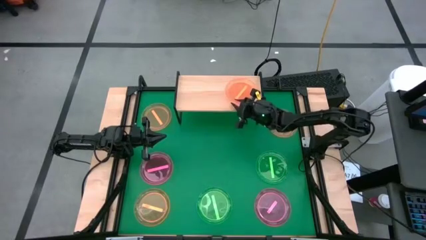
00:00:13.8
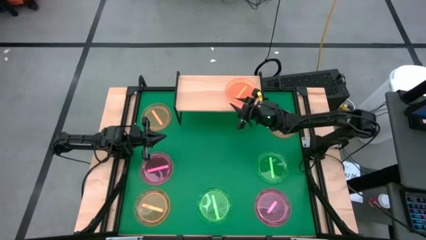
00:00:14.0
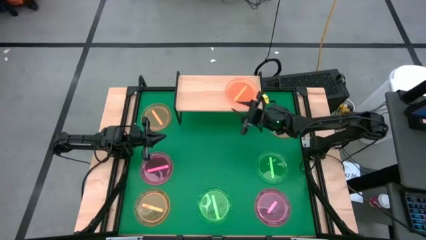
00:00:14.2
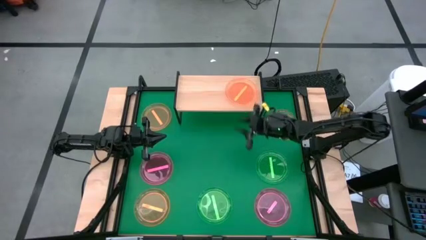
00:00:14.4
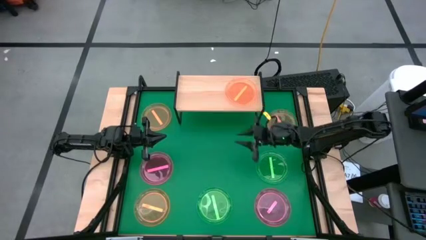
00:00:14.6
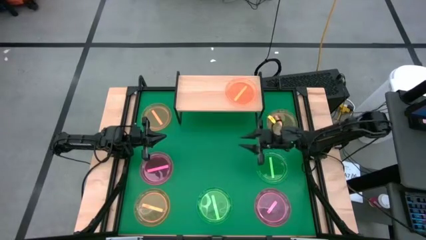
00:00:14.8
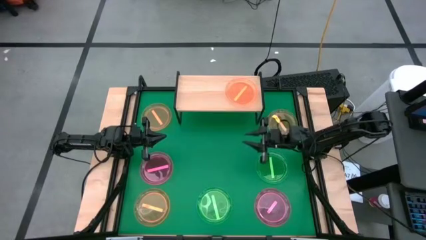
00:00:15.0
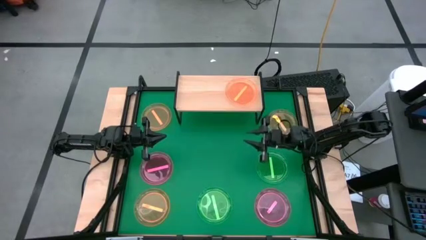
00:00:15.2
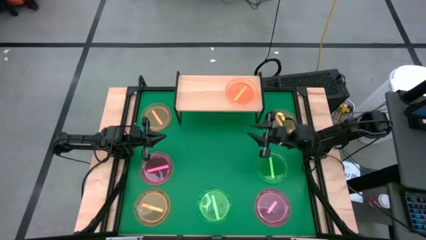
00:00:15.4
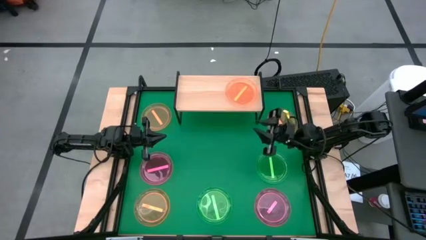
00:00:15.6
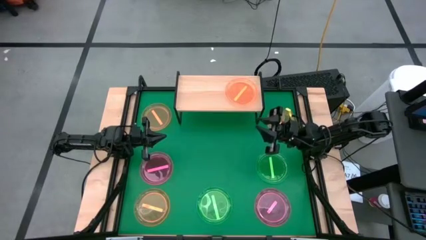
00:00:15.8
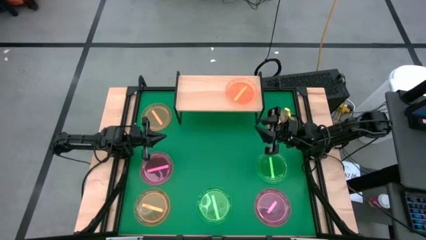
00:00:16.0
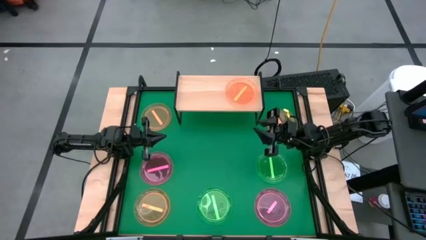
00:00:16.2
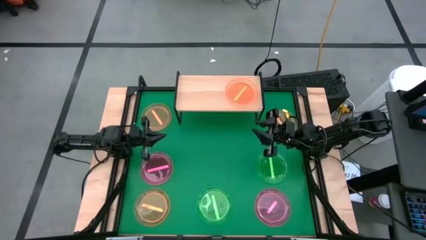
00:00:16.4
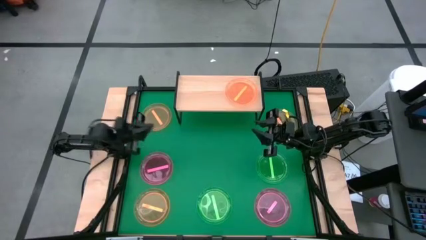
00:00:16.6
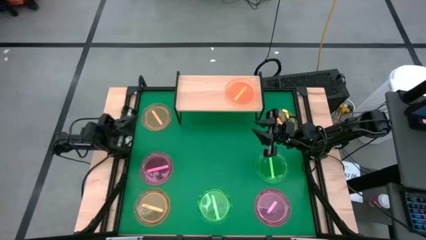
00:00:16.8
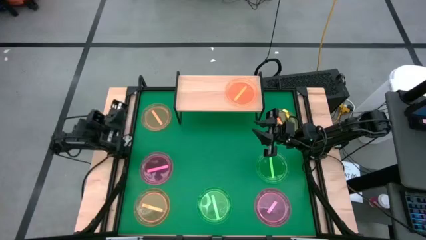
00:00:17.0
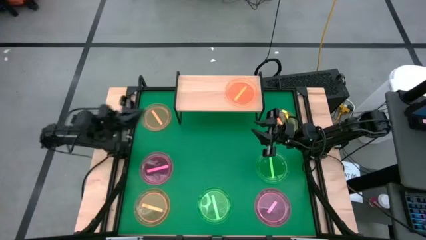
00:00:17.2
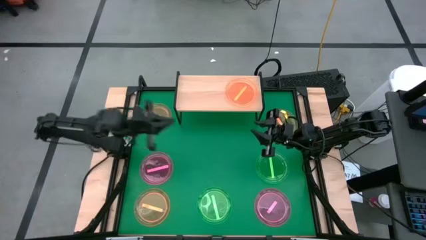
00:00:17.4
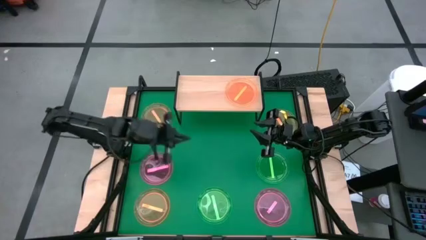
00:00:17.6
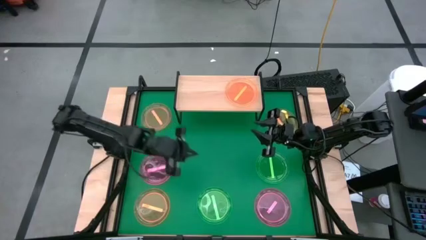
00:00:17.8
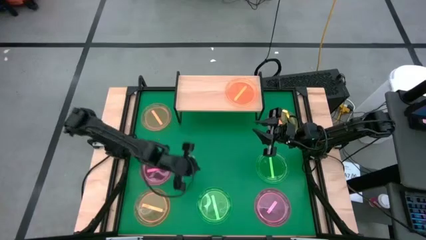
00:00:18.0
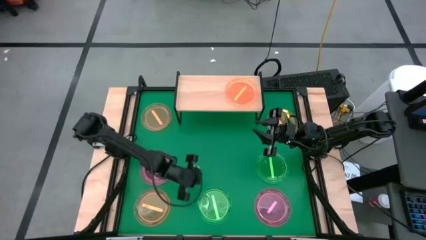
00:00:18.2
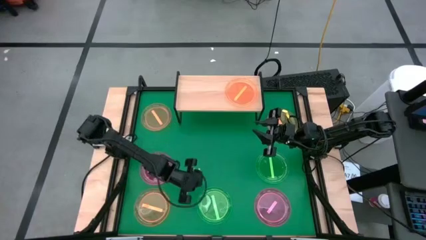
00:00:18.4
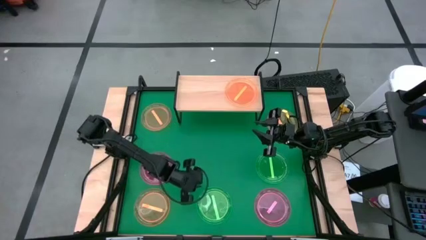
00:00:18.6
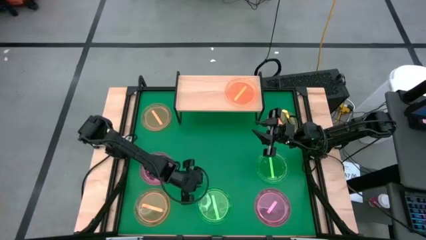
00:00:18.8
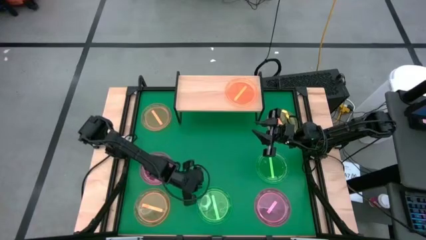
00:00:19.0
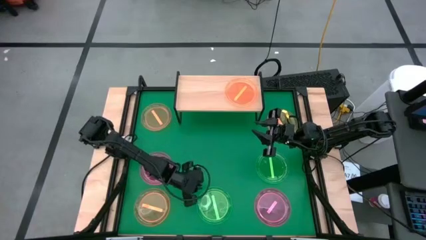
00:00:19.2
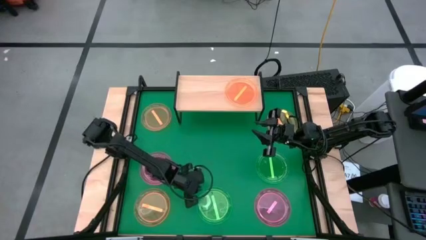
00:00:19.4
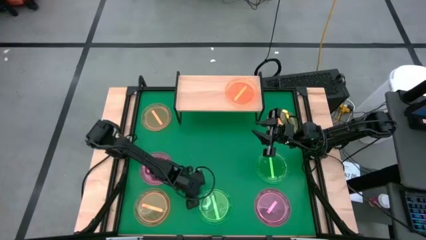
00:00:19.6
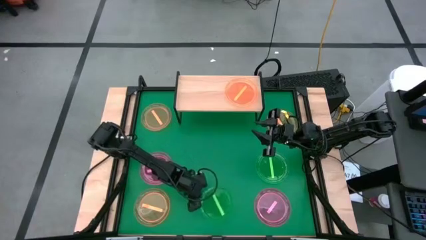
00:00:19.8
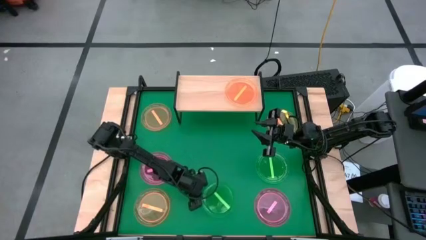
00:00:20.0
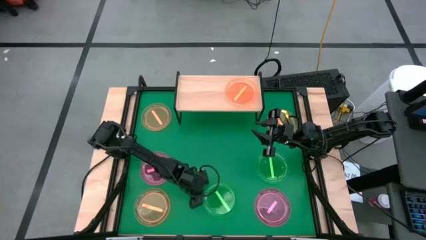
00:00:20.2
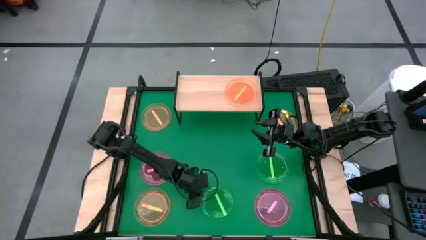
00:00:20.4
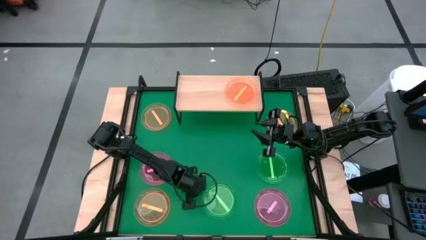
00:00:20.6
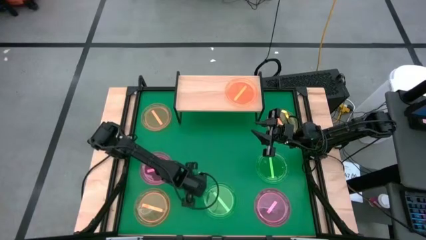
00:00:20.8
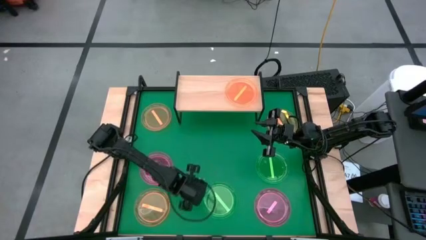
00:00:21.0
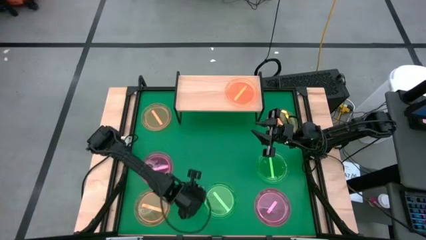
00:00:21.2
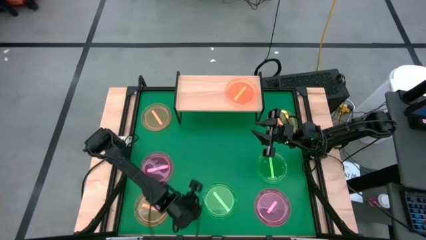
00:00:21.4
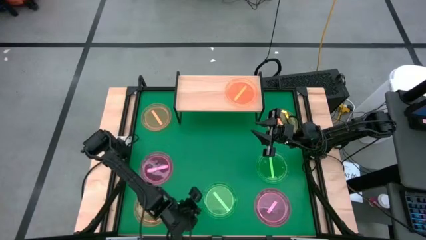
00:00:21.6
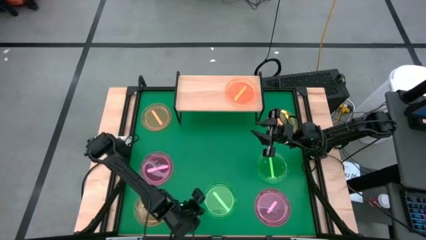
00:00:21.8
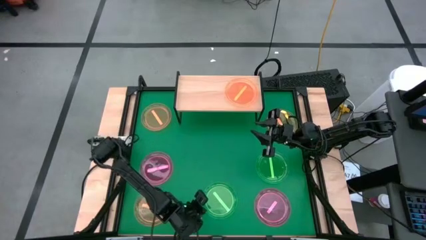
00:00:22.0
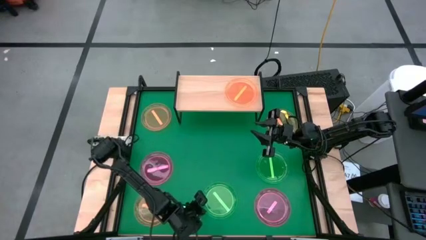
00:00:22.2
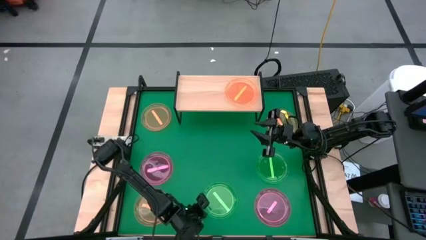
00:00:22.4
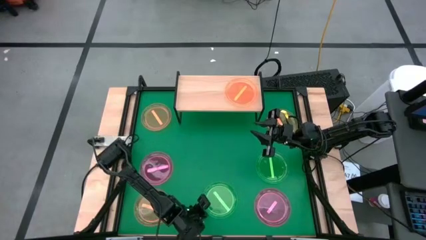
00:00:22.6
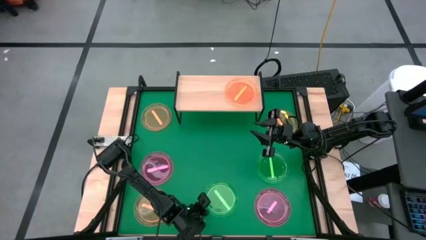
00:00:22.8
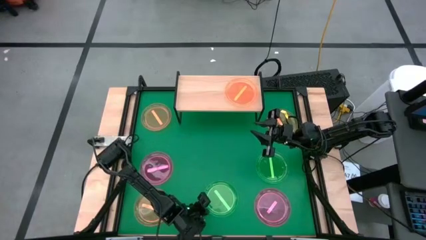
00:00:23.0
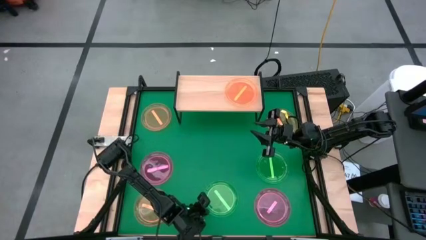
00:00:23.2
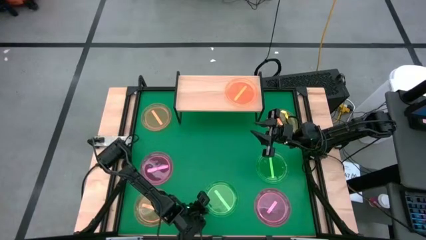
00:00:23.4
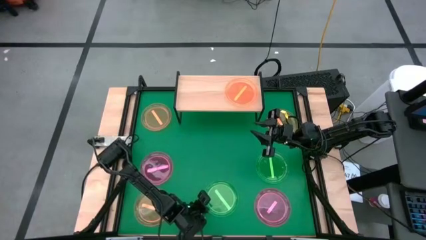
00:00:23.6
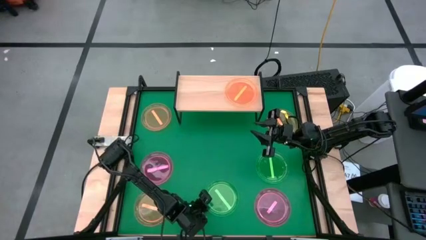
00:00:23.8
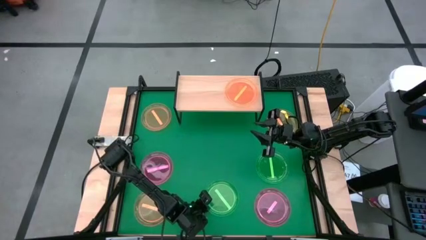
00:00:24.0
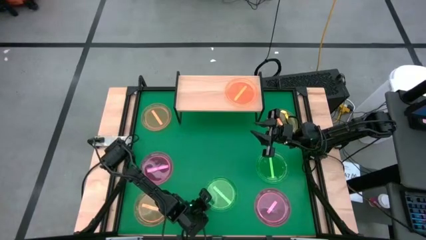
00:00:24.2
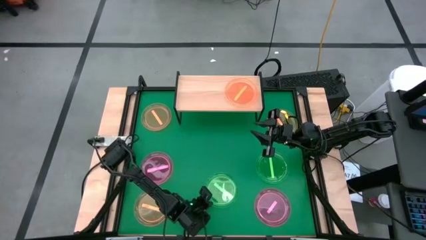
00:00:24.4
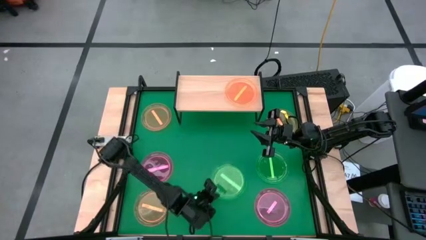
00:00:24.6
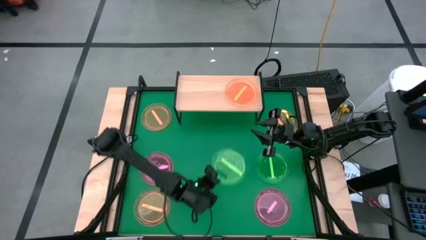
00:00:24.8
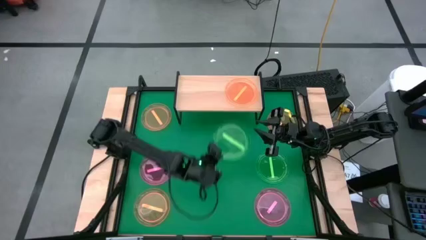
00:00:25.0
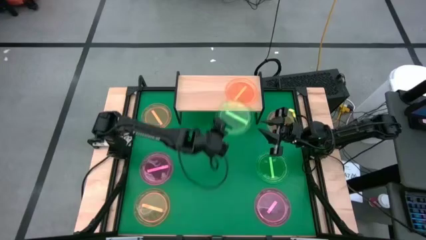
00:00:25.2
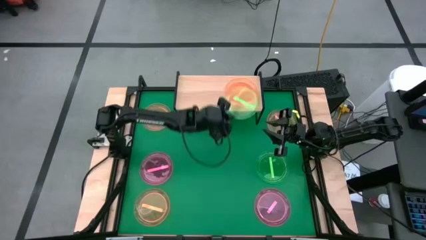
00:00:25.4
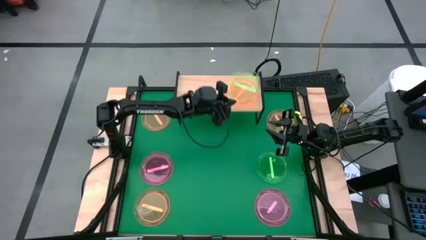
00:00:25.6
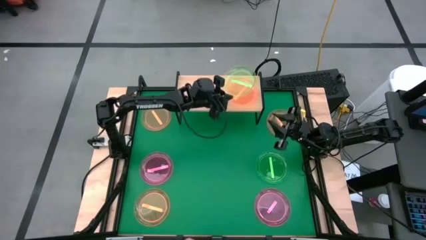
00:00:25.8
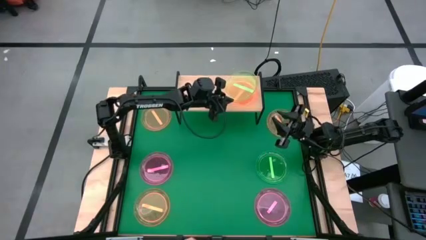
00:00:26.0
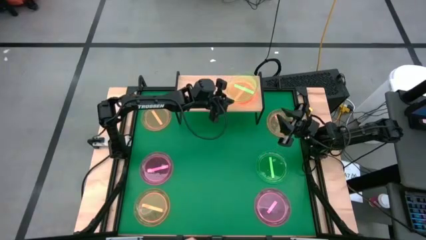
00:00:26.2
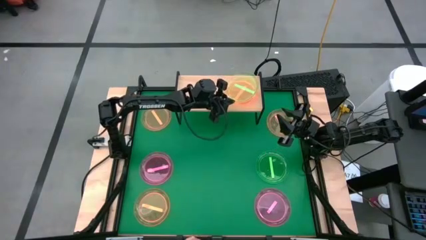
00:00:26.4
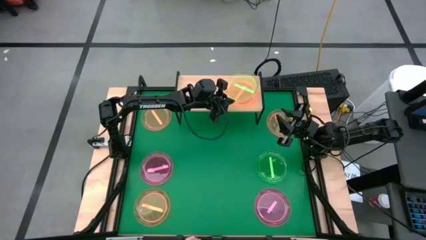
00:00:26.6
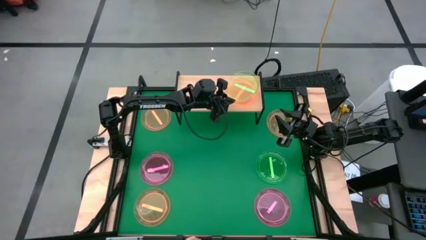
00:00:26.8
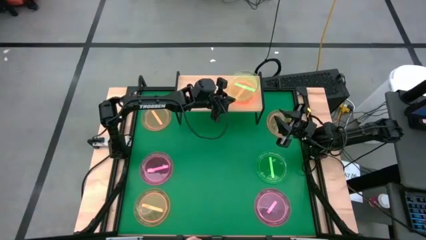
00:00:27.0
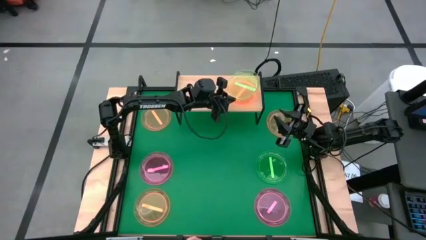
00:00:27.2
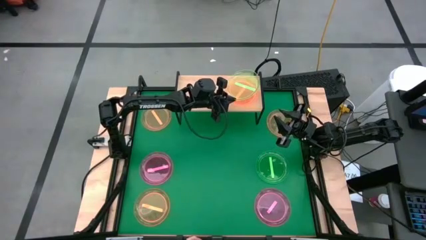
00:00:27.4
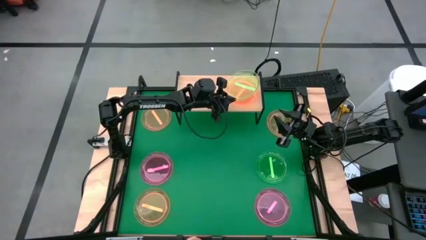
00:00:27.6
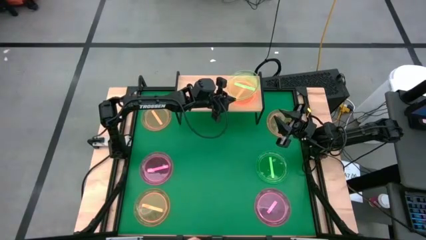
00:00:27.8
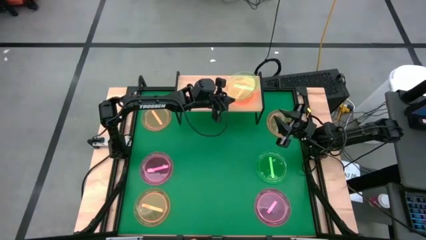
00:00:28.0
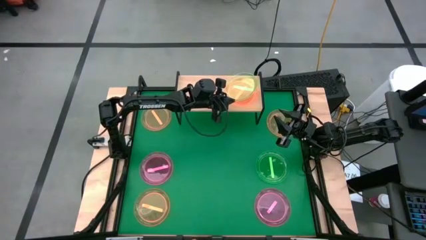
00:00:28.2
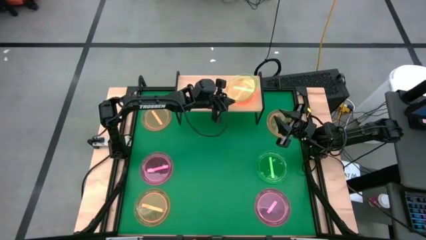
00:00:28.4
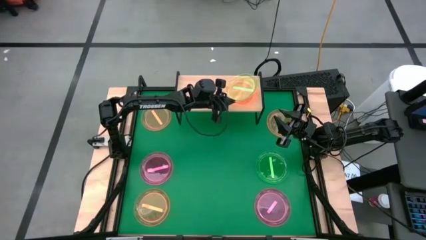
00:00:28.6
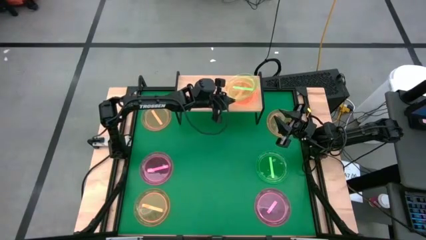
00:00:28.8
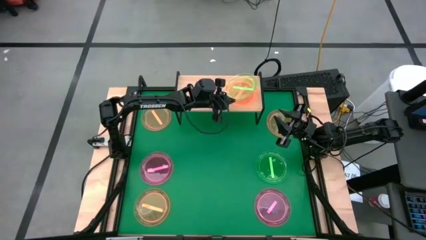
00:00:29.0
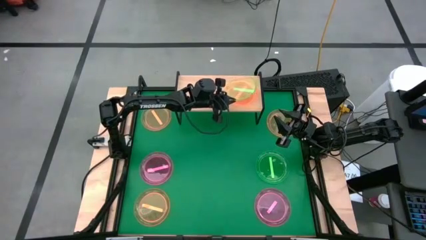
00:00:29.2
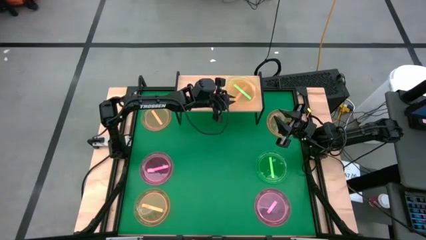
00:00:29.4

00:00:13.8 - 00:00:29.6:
Task: Place and stack plates onto a shelf
Stack the green plate on top of the orange plate on the shelf
